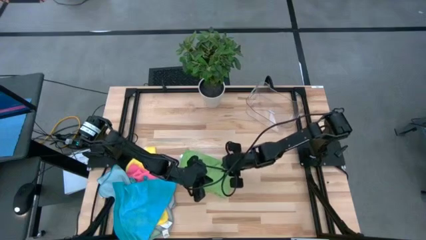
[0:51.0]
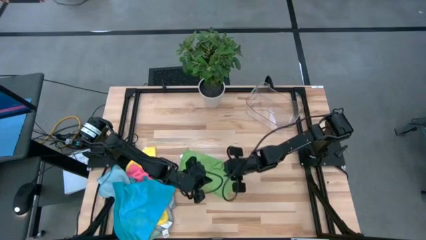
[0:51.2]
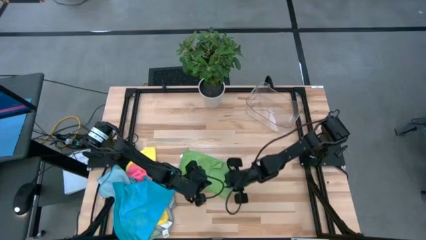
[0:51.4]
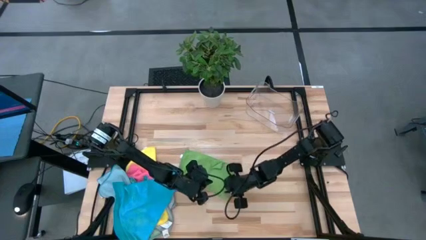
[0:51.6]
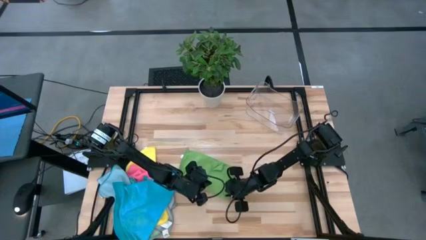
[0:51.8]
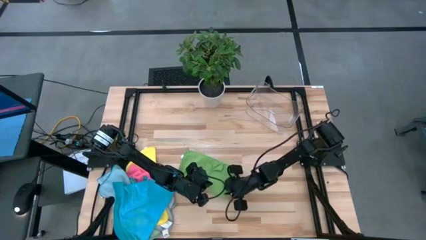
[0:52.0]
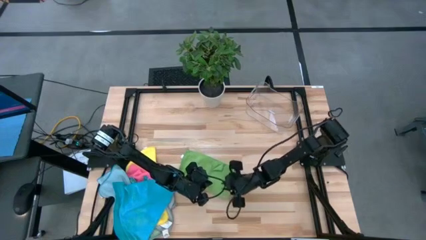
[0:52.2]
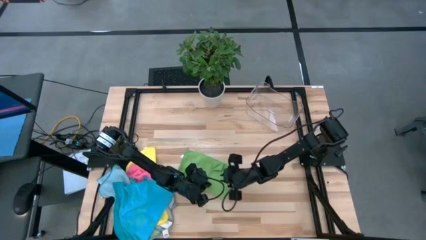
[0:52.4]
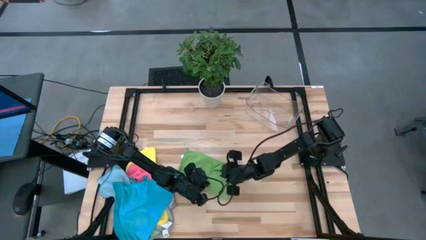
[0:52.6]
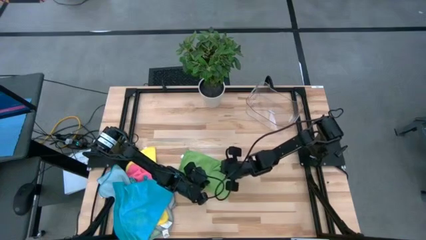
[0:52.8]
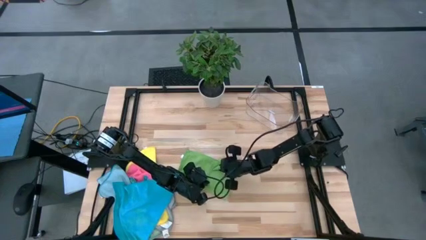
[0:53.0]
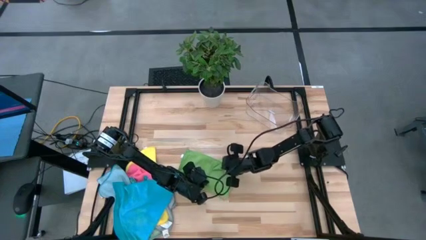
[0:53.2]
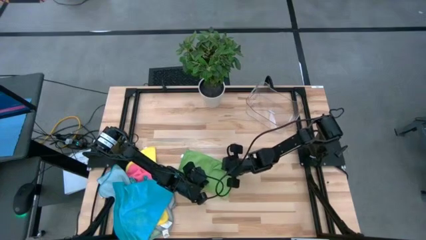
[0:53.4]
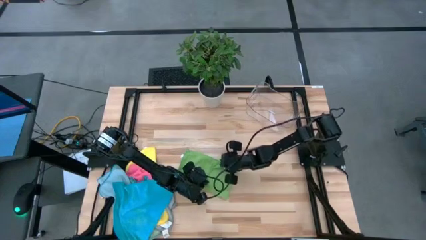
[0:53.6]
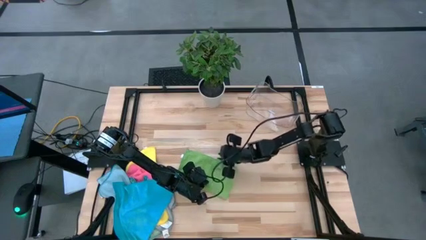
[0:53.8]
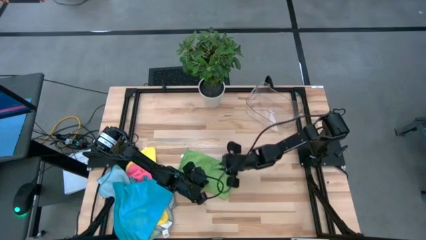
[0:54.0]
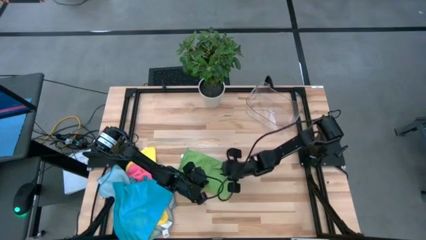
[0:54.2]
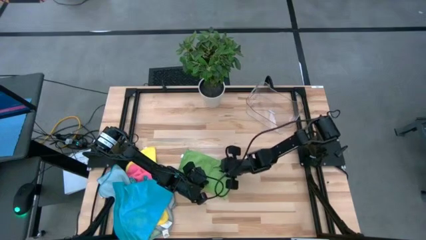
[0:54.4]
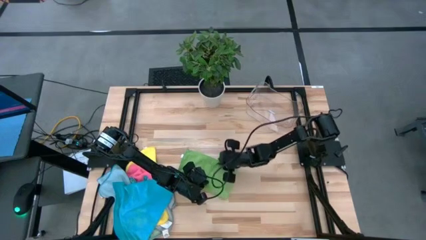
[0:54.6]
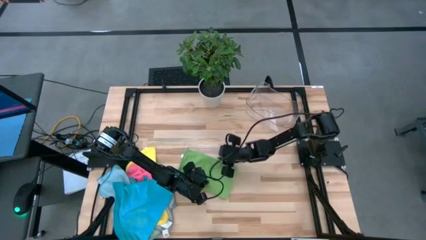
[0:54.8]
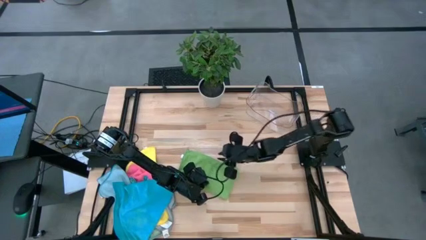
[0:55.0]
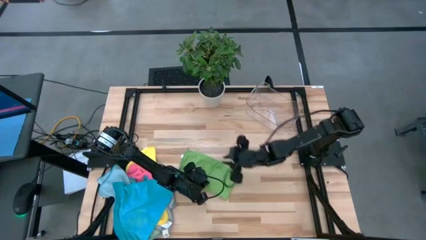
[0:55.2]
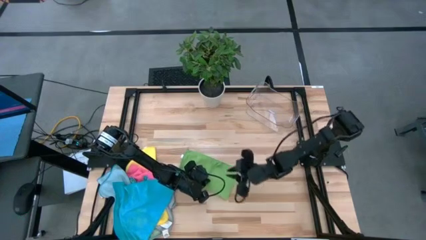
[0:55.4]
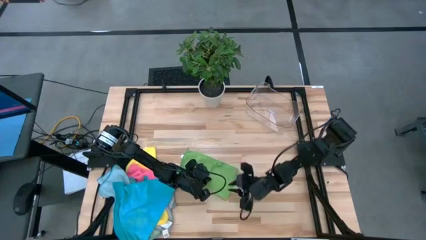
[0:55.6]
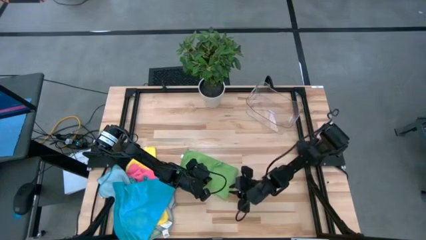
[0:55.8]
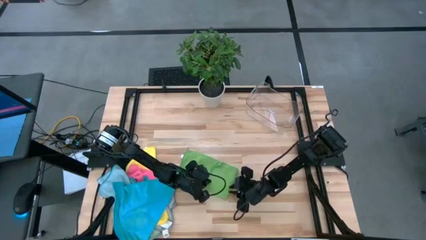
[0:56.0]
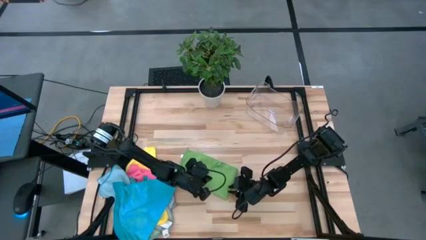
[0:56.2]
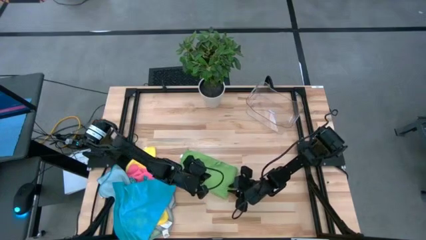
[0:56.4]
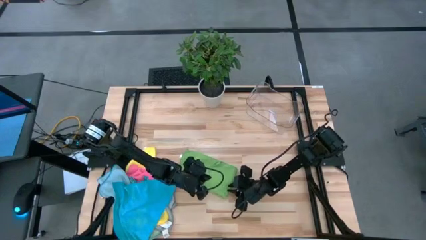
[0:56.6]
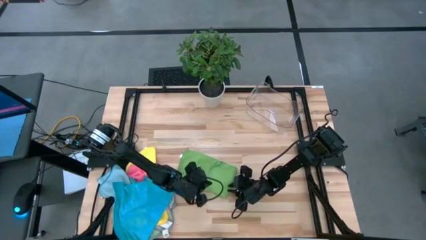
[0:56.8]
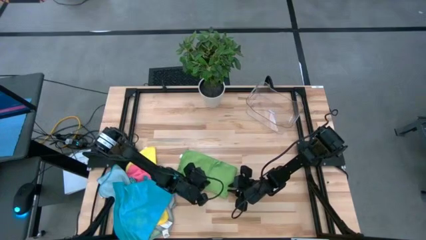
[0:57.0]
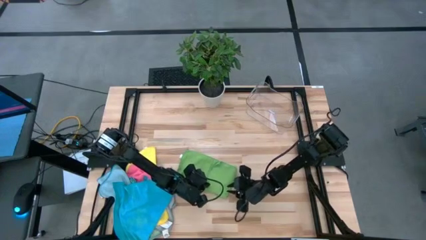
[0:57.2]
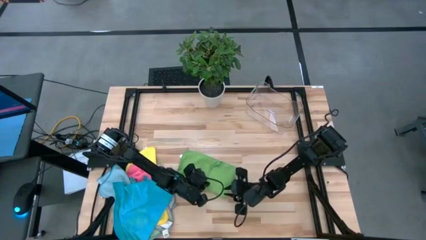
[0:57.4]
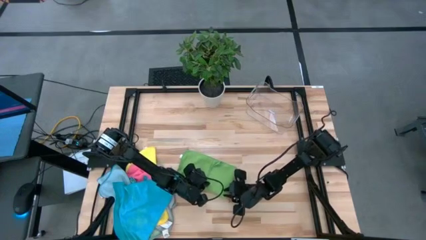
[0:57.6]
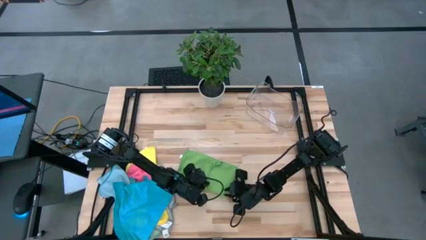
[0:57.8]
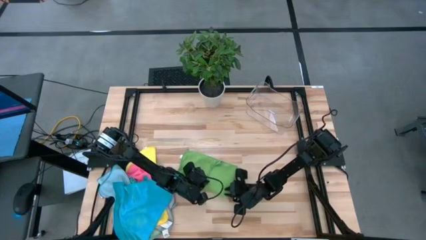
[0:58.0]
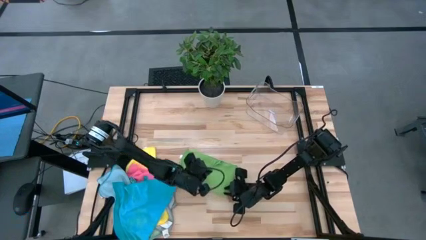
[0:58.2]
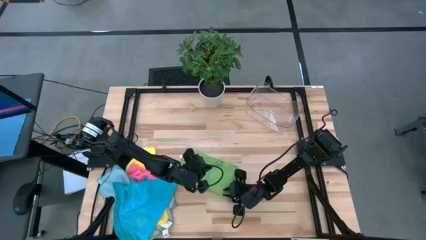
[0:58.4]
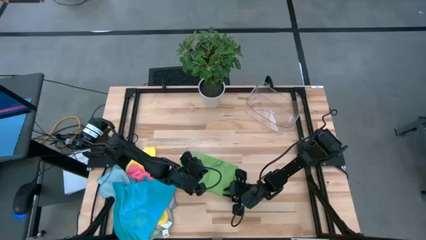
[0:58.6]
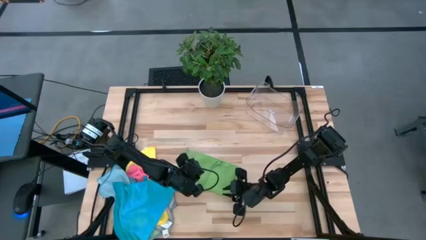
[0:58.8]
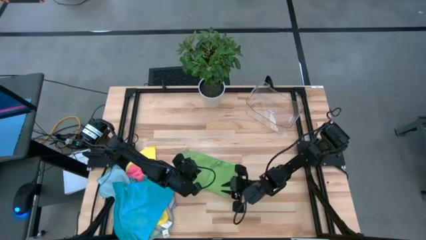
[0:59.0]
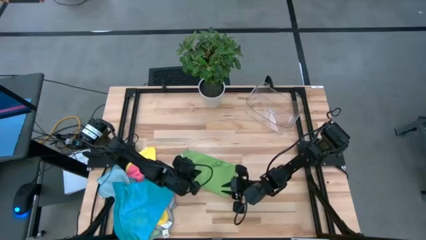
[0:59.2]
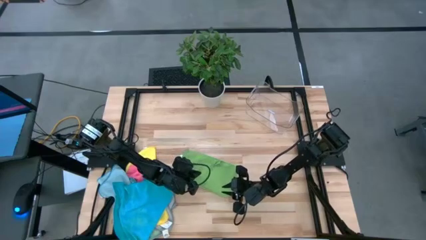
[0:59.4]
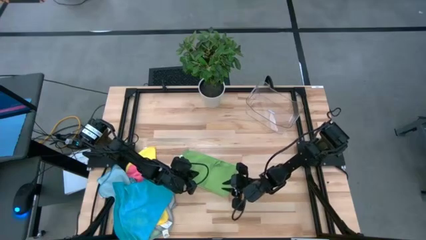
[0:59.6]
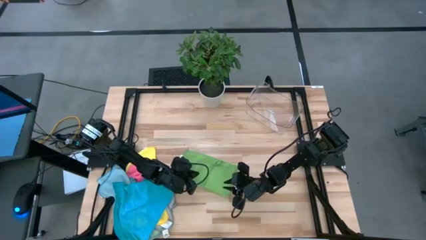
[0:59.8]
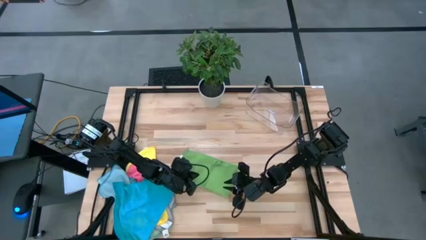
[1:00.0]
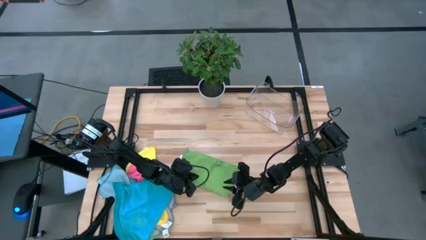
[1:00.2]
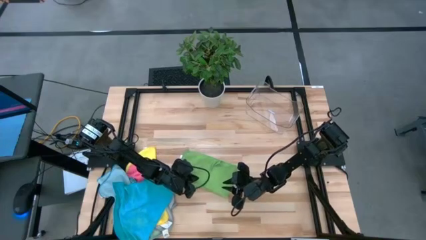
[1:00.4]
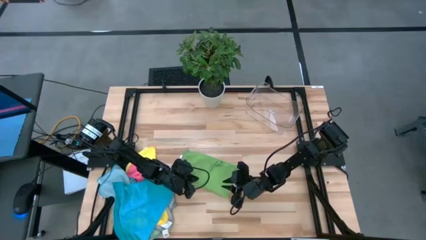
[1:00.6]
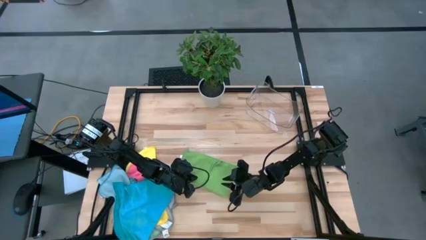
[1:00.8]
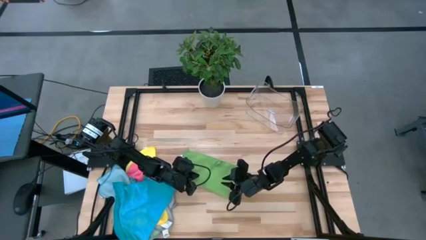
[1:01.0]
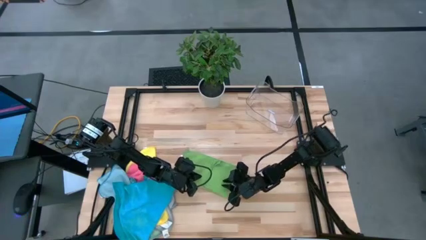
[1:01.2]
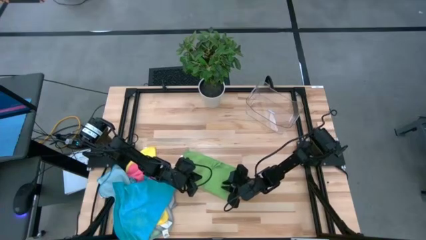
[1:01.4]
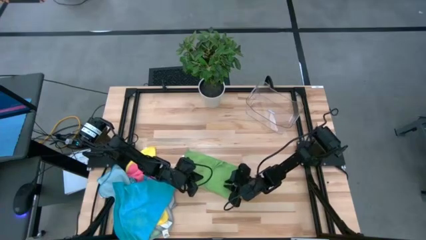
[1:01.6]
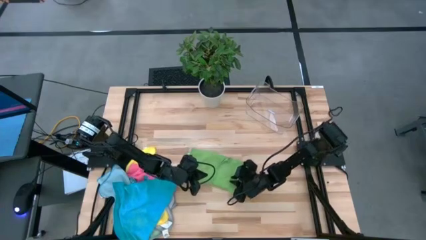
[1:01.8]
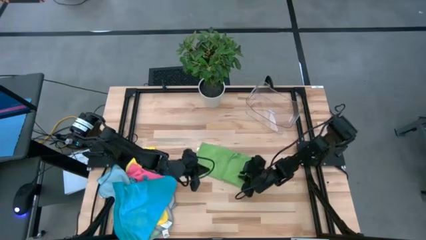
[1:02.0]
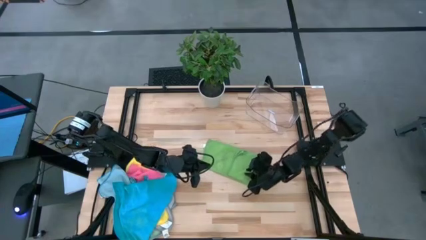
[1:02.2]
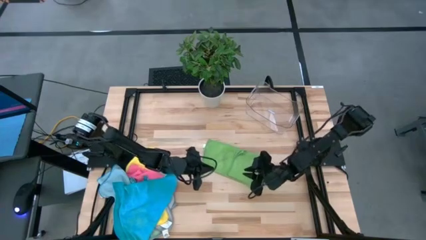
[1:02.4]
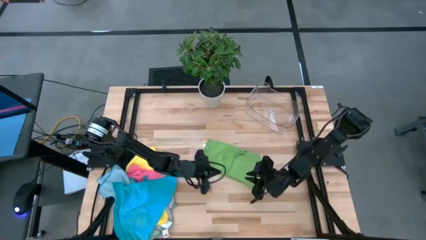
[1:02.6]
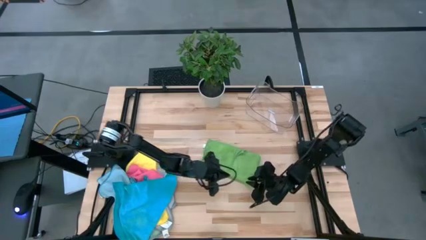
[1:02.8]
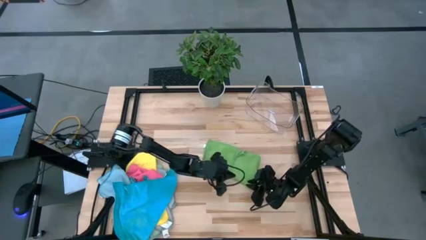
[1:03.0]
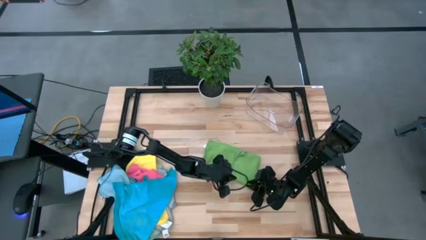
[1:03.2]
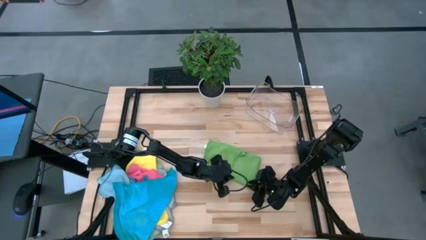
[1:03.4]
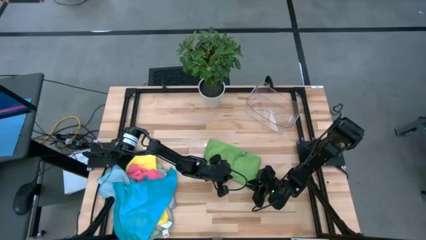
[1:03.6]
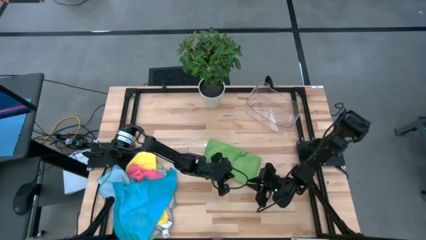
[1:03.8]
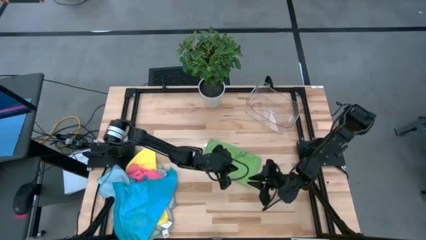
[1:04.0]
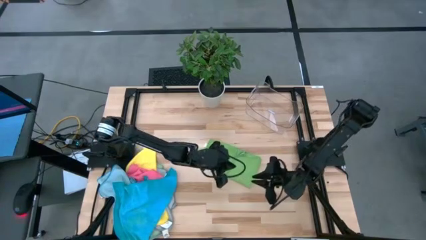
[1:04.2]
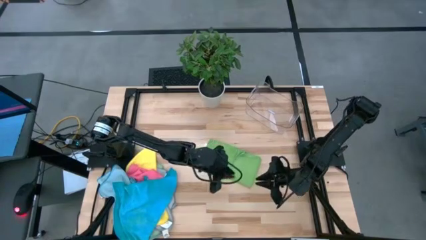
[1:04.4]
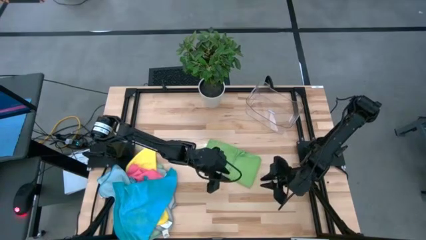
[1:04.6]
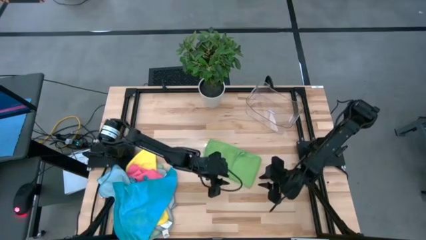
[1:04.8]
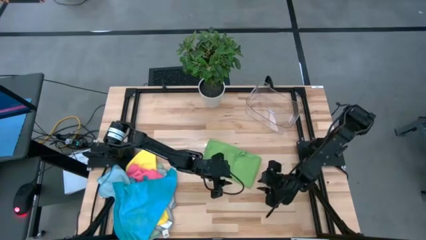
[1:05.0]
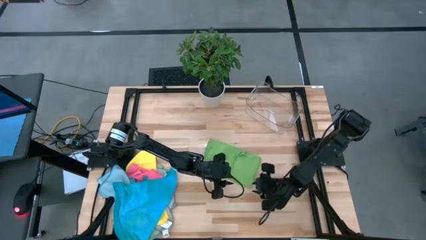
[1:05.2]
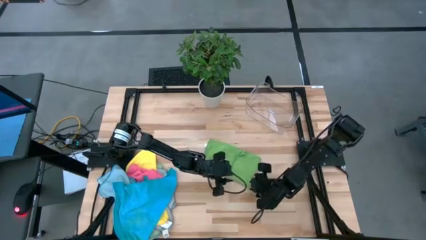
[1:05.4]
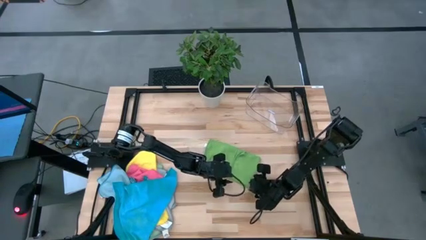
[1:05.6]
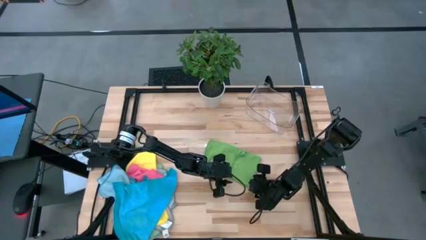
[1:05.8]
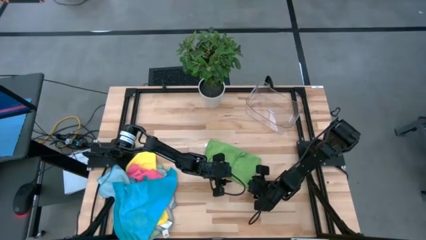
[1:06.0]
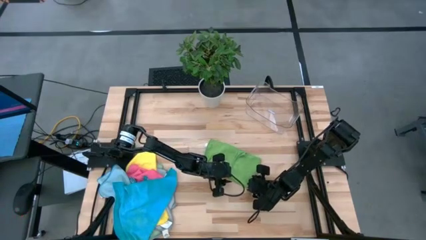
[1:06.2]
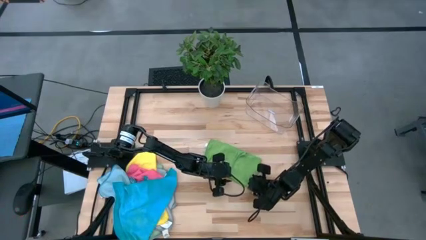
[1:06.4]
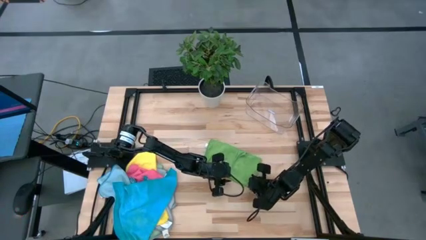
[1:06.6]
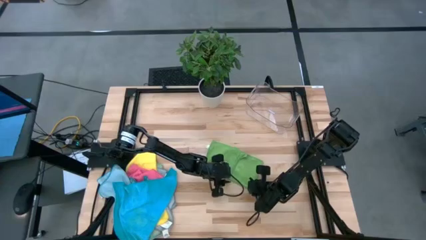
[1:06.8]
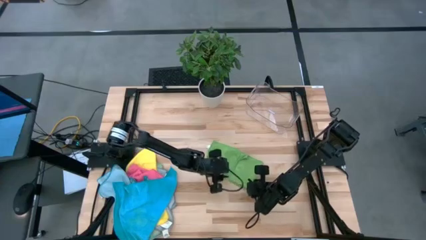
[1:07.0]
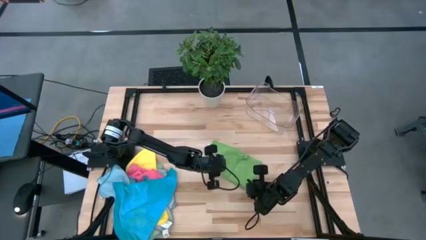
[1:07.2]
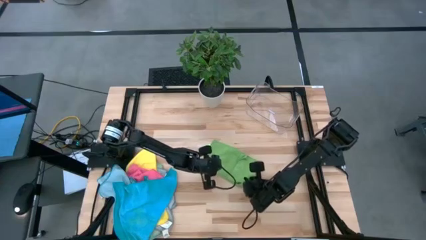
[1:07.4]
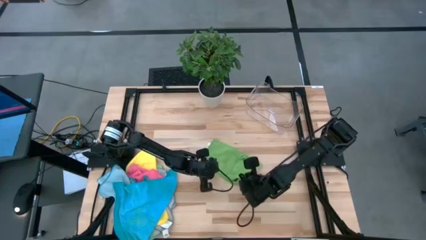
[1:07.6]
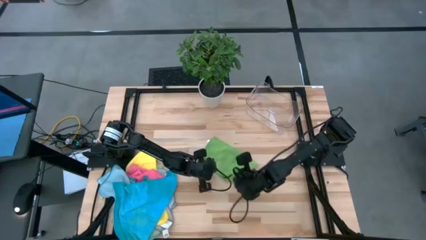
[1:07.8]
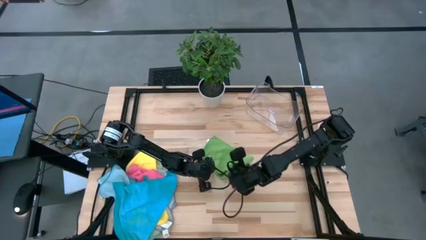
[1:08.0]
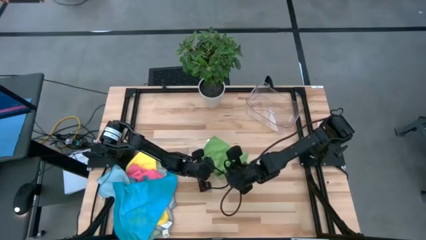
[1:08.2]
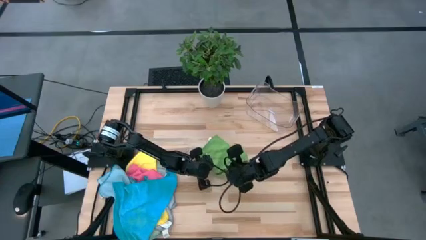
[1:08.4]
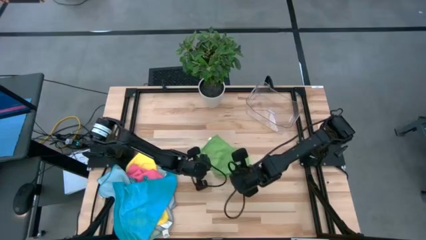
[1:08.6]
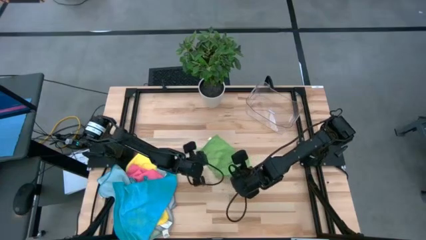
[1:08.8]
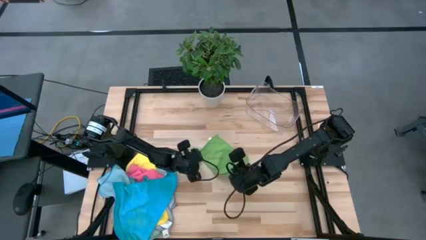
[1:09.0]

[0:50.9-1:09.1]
Task: Fold microfiber towels
Fold the green microfiber towel
